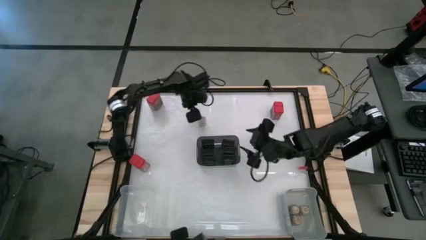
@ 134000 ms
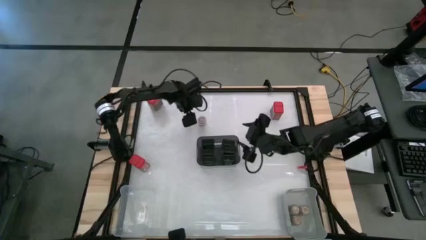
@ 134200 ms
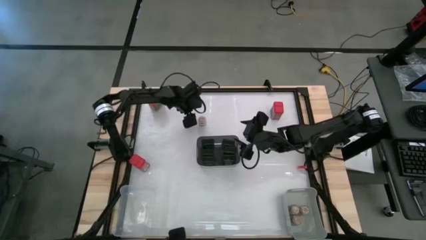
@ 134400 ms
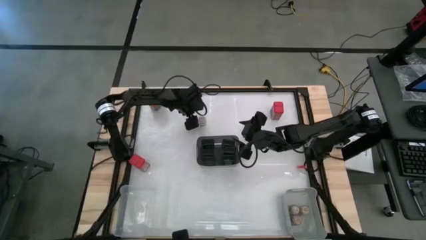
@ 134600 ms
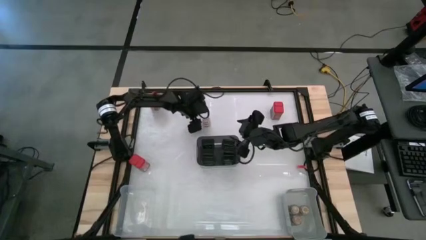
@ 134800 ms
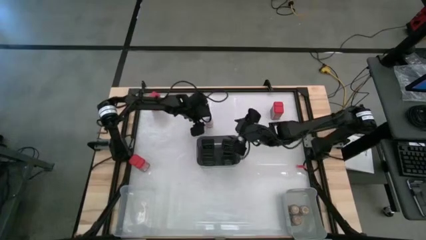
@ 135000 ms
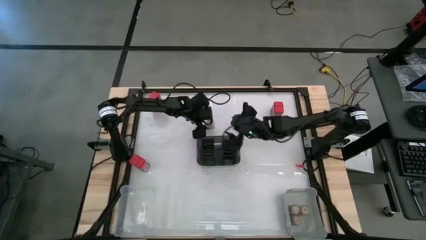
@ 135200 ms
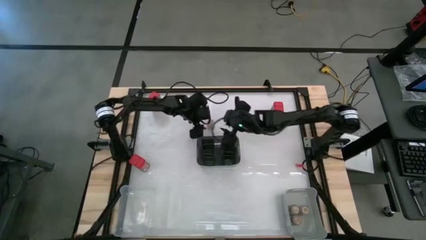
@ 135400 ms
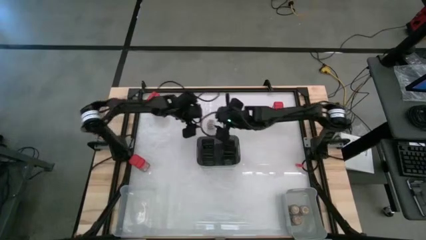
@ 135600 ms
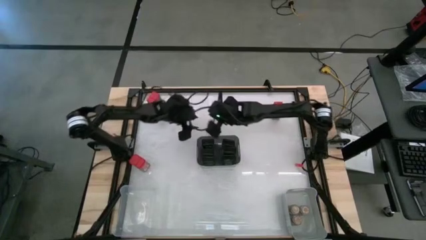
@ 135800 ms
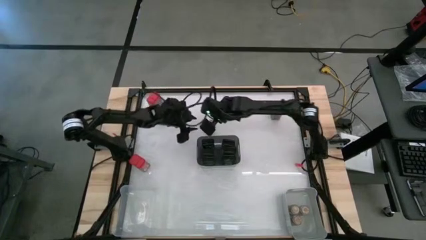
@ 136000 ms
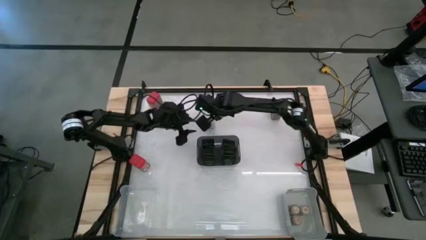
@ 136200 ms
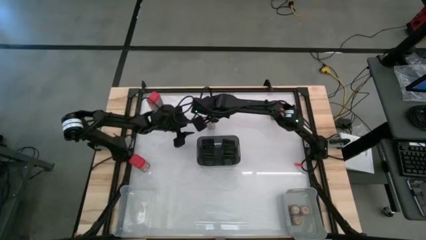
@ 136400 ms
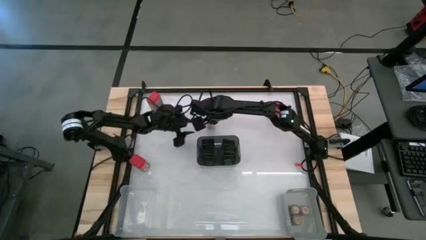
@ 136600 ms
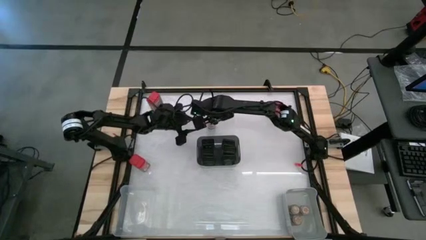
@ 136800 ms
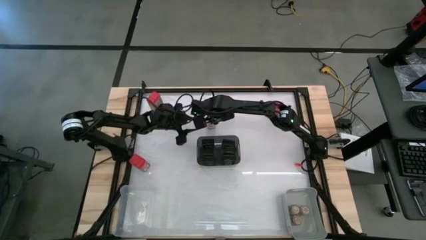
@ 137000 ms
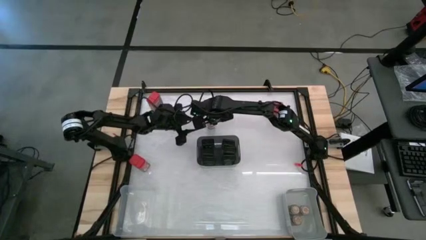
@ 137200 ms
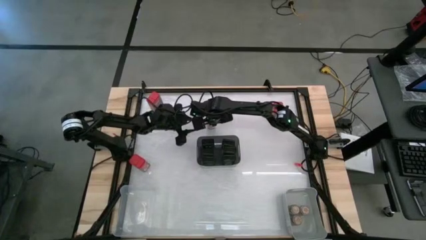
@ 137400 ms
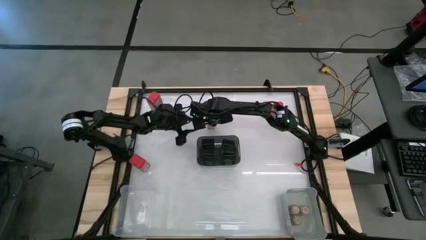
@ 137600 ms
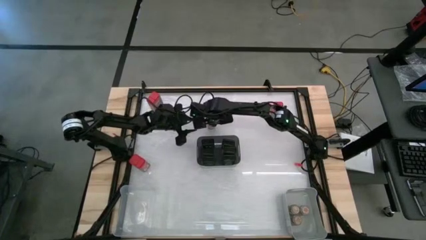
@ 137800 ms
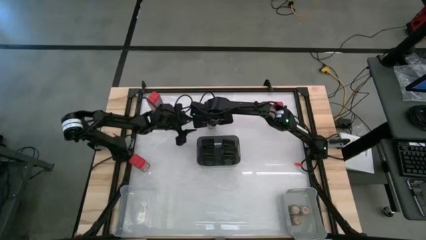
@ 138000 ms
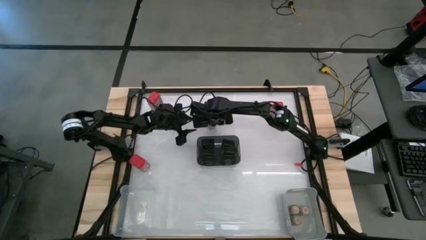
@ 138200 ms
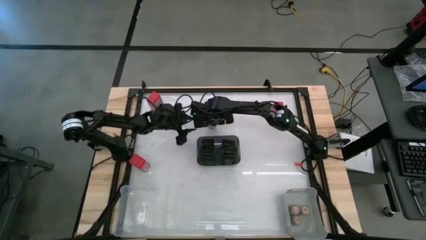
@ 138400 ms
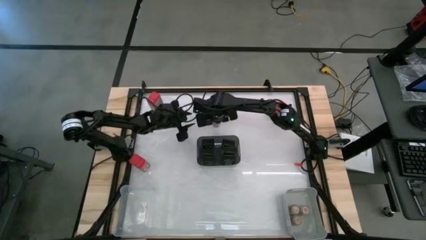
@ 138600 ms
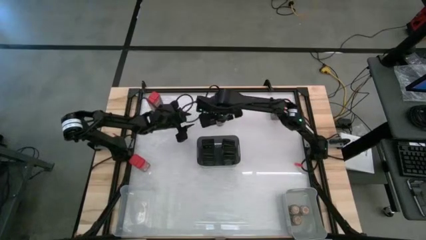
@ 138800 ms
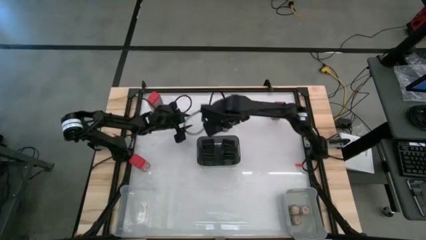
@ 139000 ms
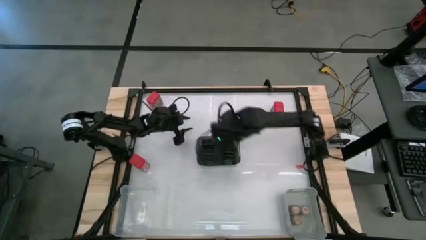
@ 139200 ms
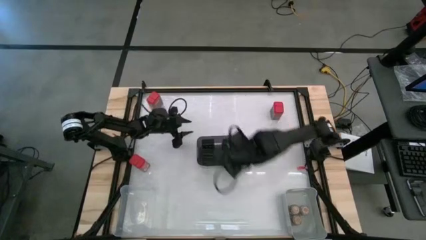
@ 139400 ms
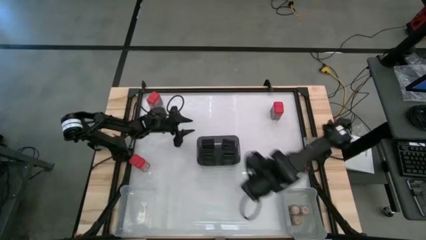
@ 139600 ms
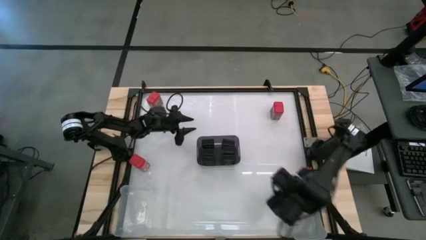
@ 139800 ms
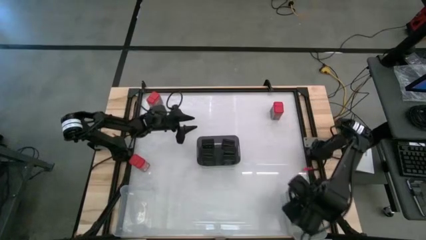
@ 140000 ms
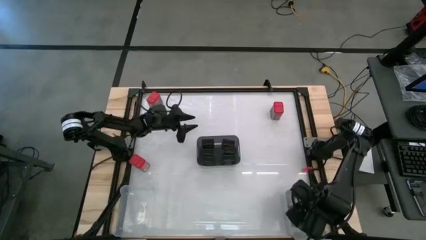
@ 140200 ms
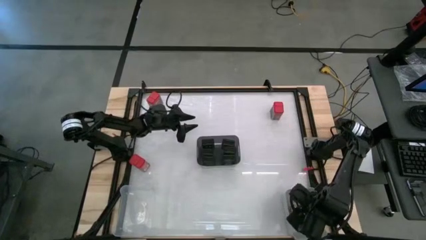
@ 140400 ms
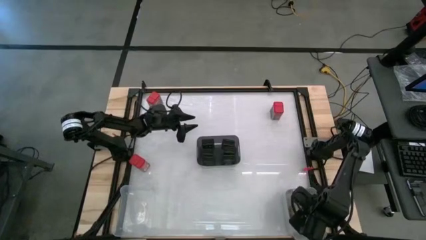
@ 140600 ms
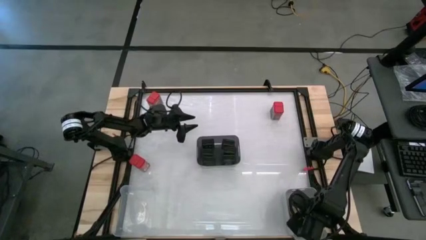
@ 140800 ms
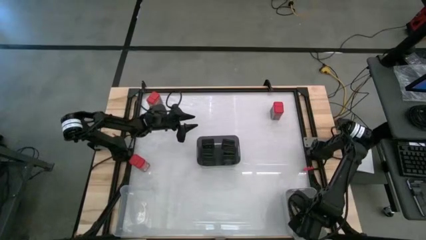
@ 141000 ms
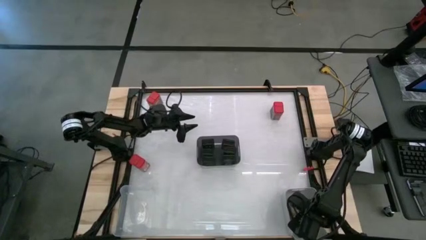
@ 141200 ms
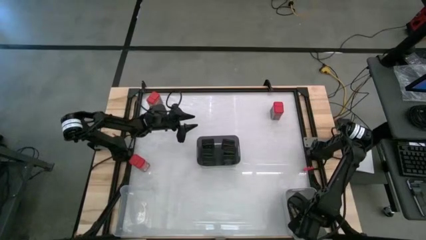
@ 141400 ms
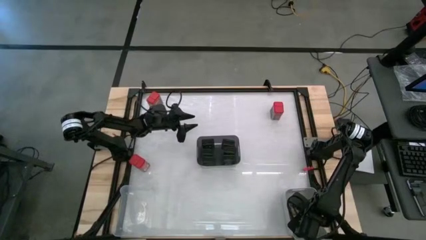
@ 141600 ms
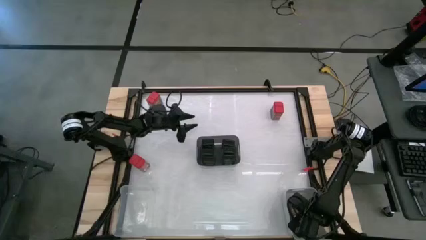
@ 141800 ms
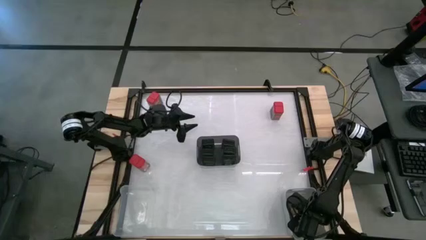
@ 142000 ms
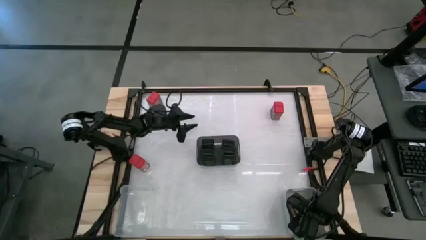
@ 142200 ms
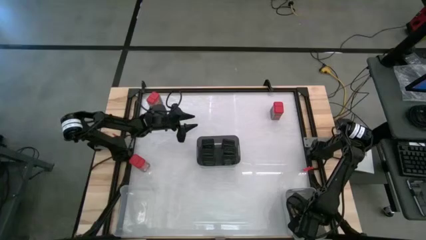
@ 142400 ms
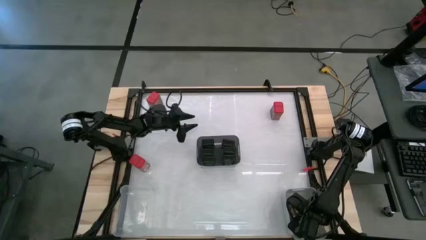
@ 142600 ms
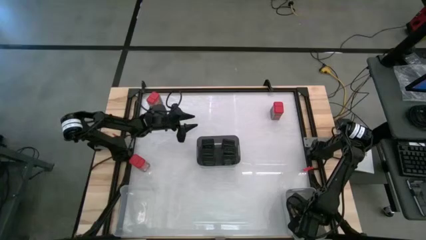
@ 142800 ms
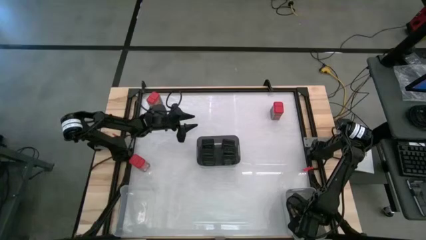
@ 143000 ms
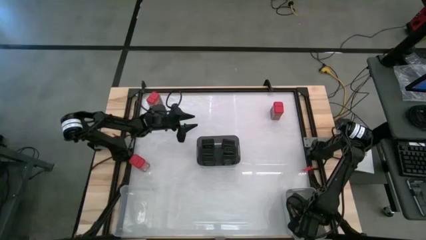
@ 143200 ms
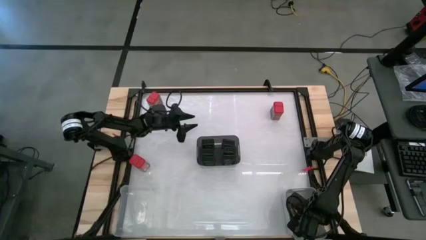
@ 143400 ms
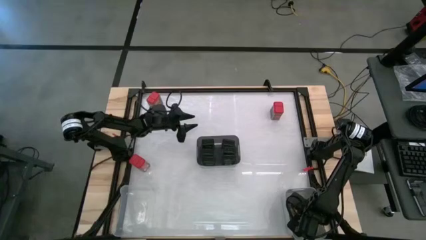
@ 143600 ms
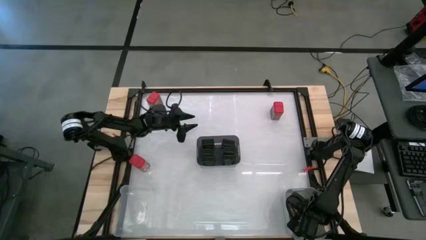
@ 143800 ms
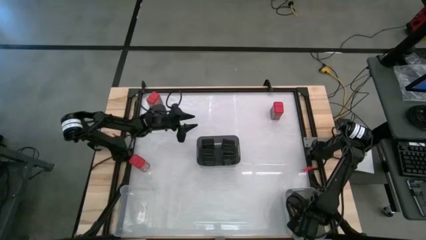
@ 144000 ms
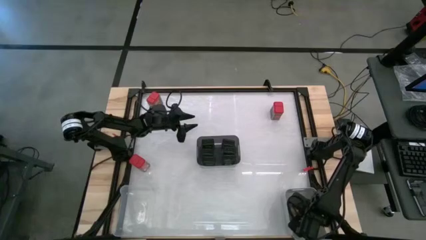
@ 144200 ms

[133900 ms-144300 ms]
Task: Sort spices by type
Put the brown seasoning bottle into the gray bin

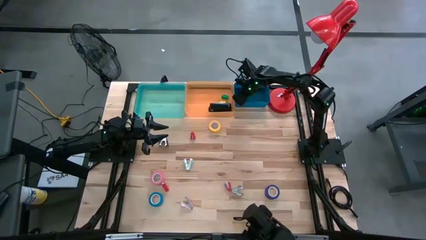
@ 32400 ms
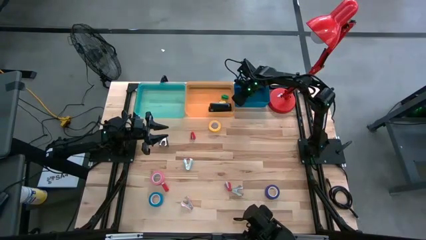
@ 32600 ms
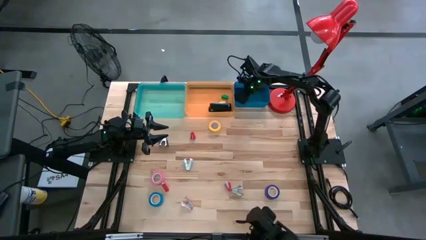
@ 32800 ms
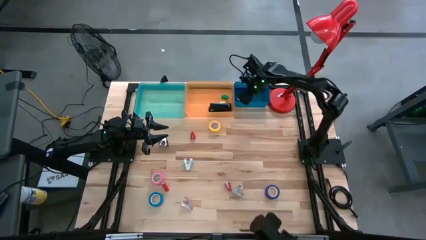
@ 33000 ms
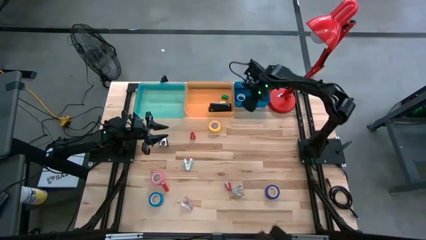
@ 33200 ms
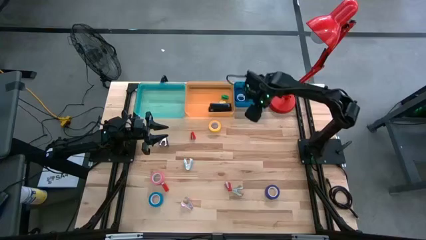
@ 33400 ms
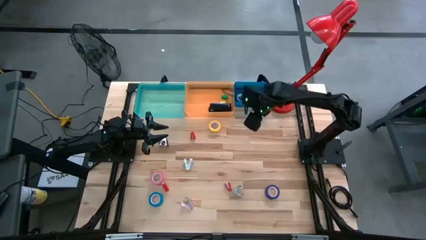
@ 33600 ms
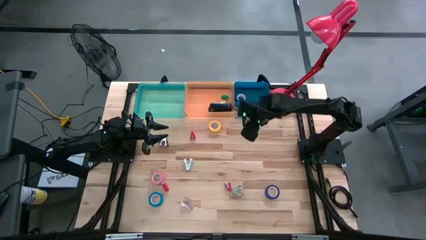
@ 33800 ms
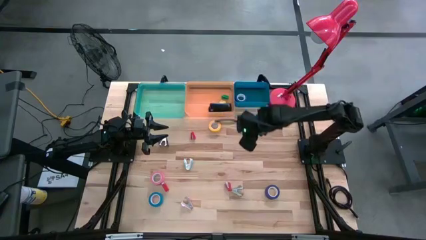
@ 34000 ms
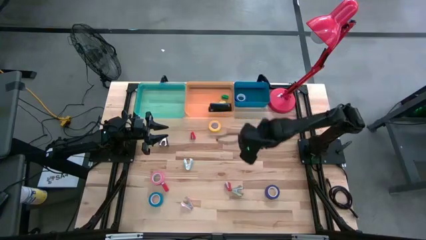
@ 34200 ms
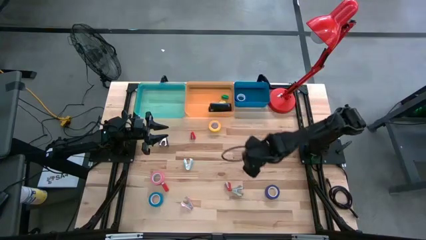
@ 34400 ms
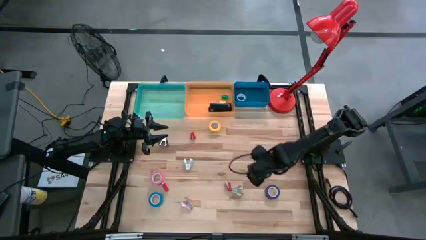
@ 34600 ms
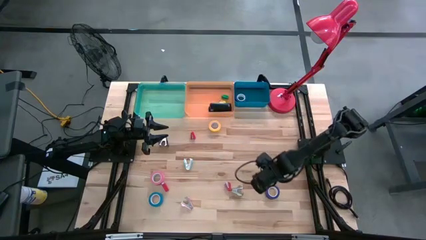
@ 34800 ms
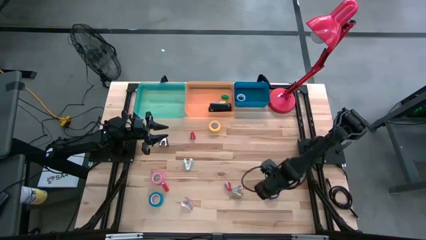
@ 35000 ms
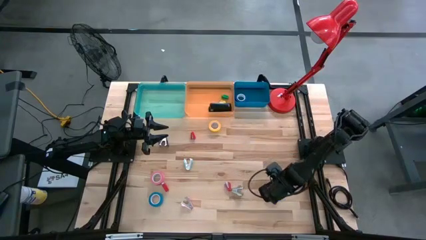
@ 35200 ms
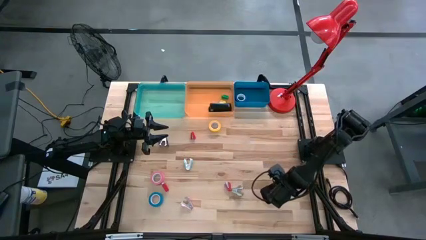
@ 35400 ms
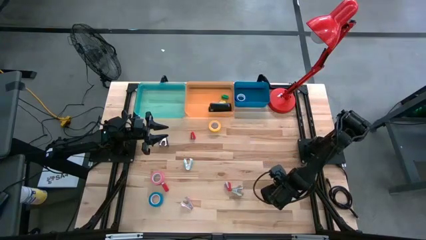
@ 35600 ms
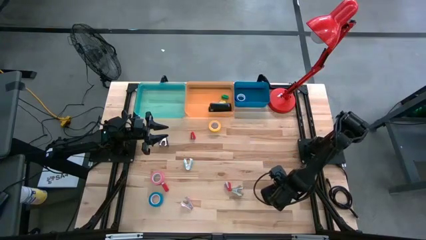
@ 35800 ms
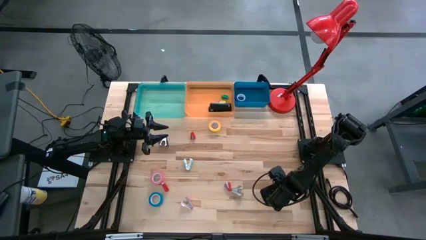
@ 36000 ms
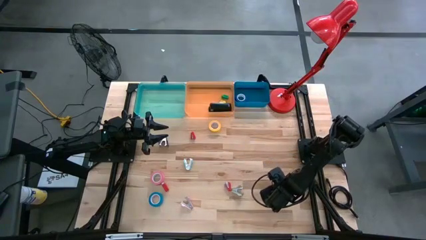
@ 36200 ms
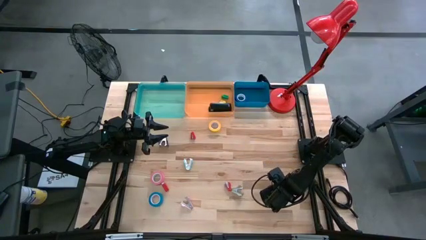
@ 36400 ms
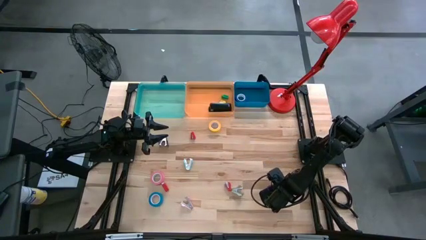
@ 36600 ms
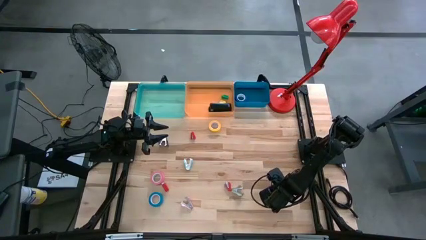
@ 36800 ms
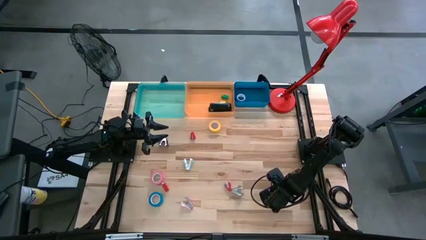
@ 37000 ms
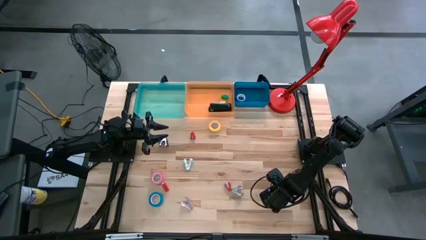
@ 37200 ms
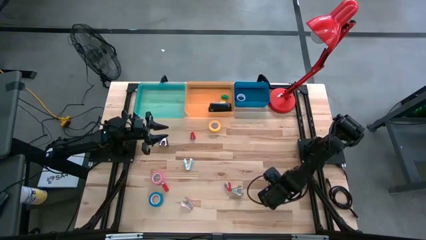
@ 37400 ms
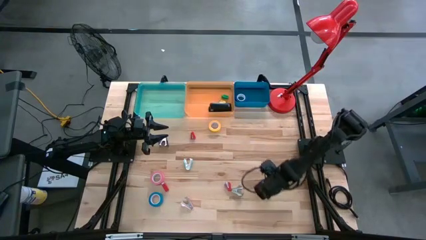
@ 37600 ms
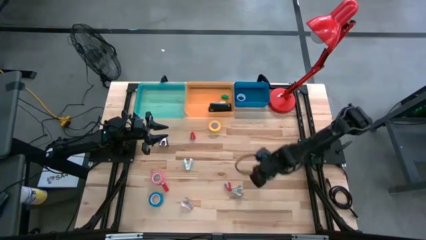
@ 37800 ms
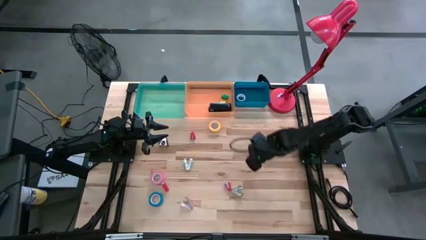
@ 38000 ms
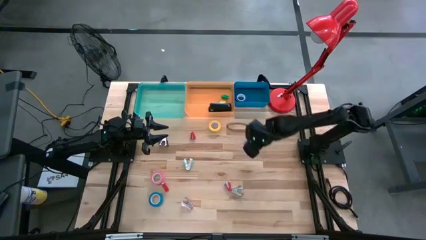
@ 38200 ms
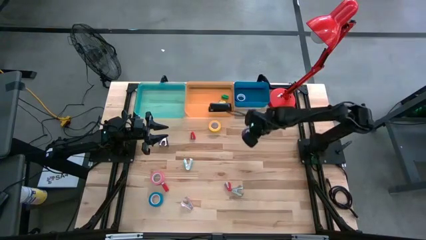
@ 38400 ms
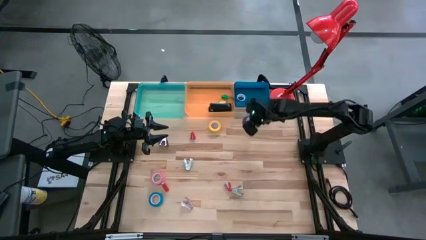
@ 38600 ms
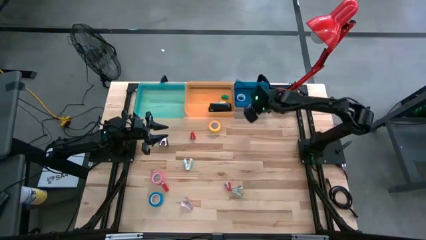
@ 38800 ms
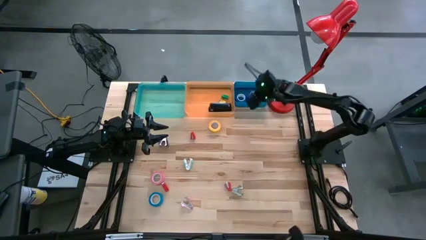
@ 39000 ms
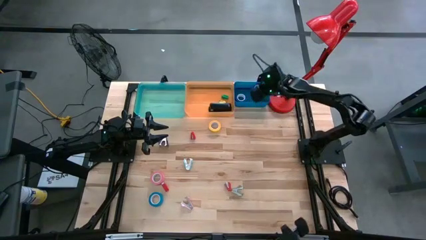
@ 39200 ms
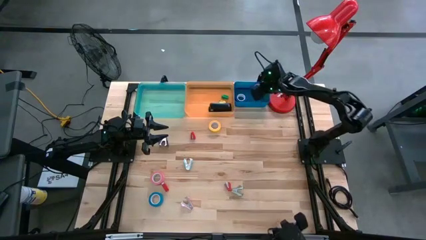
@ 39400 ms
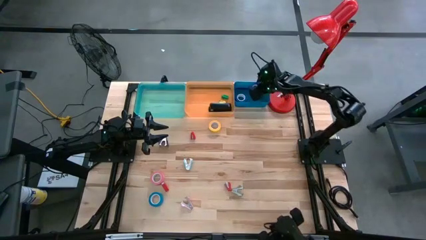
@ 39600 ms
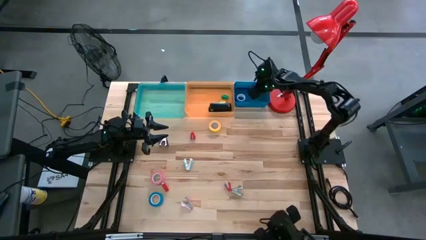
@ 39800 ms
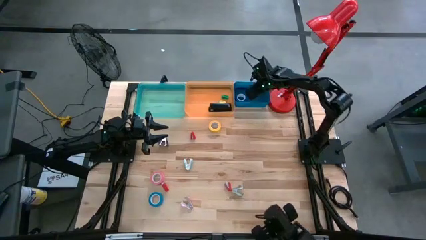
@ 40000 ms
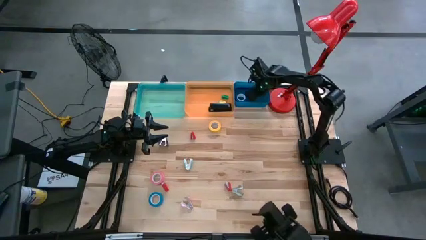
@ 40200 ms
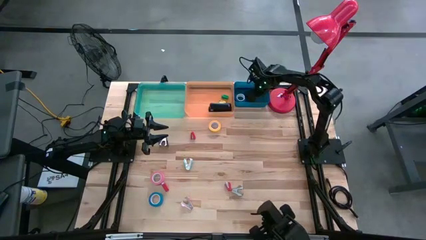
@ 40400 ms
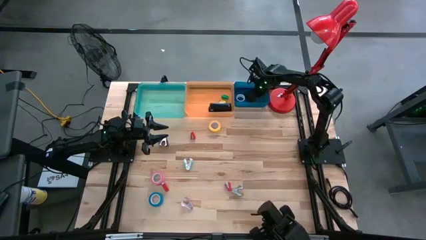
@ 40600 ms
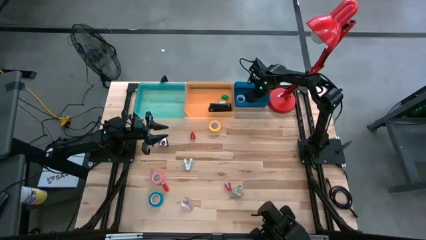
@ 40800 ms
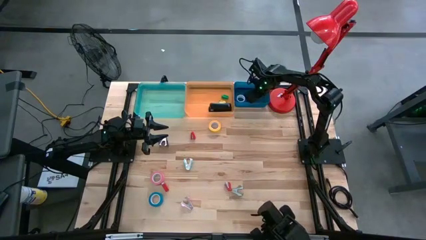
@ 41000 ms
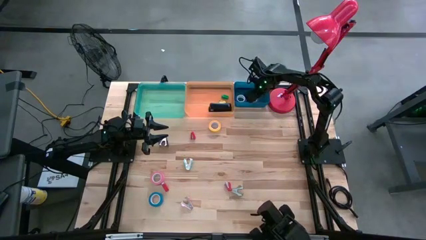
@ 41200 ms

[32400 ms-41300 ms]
Task: Pick and place Stapler, Stapler remover, tape
Put the violet tape into the blue bin
